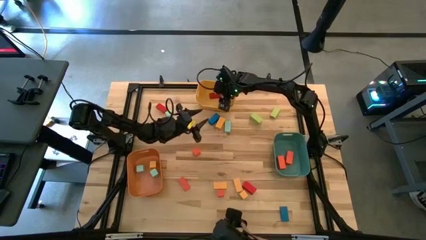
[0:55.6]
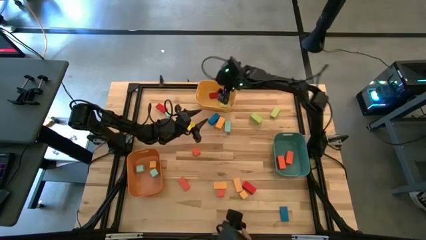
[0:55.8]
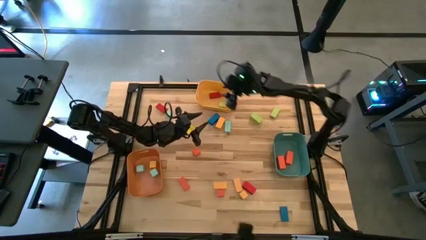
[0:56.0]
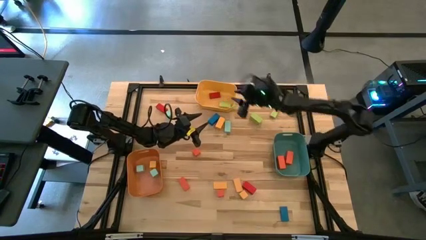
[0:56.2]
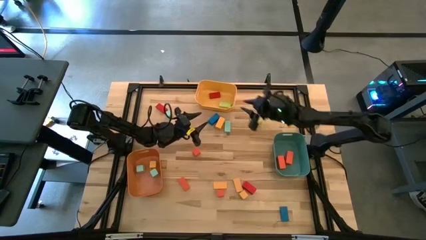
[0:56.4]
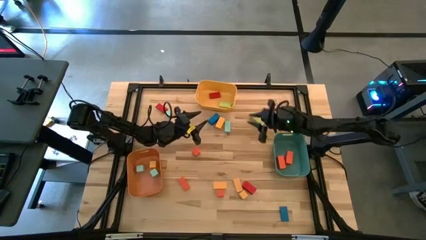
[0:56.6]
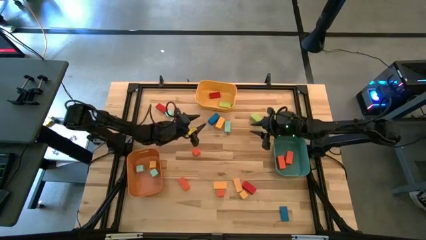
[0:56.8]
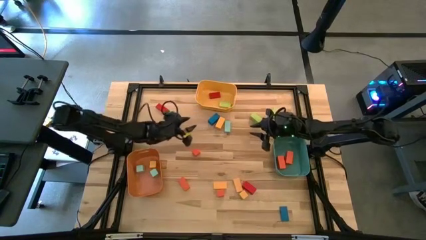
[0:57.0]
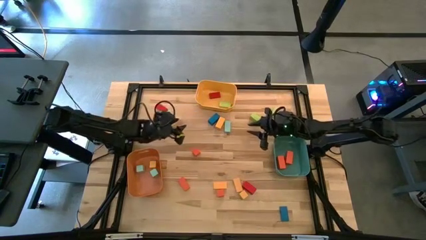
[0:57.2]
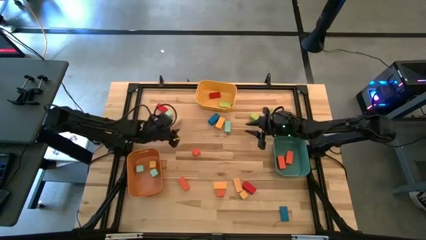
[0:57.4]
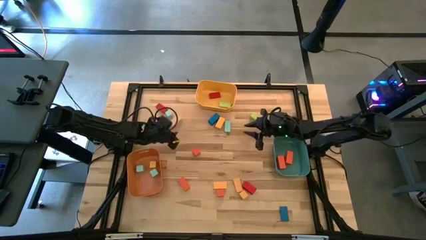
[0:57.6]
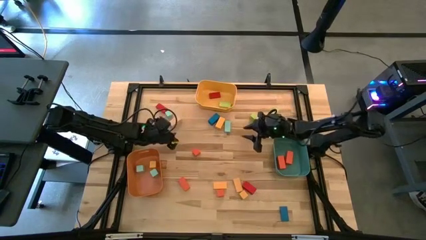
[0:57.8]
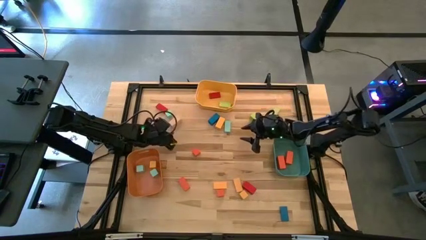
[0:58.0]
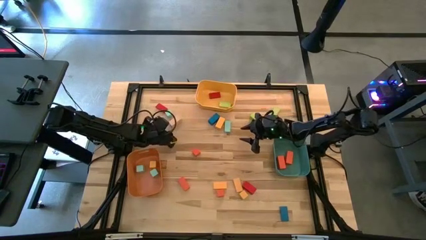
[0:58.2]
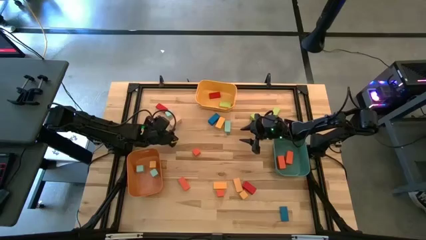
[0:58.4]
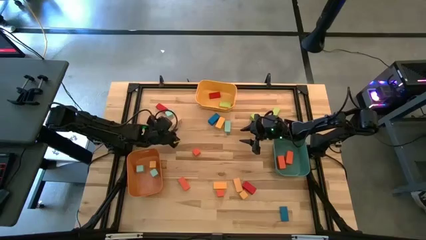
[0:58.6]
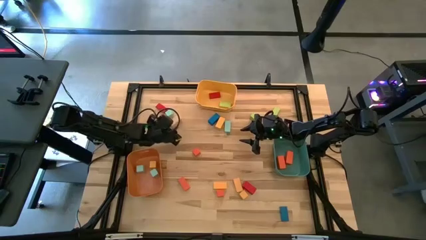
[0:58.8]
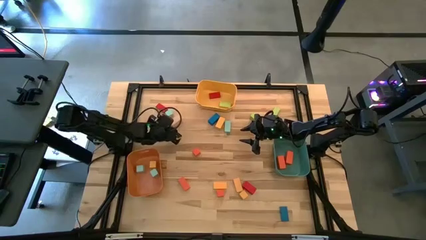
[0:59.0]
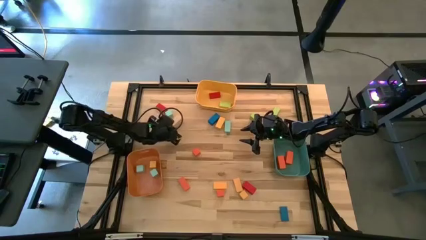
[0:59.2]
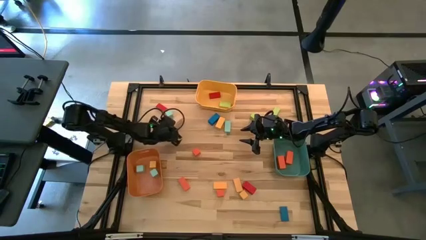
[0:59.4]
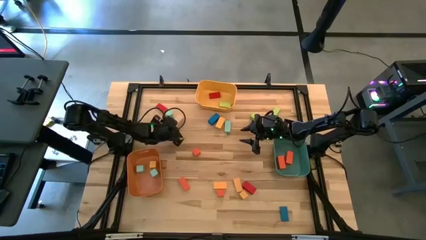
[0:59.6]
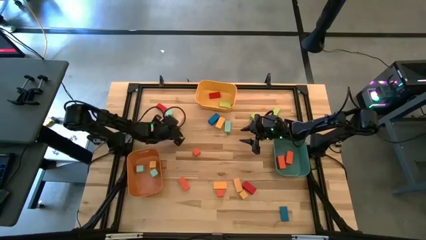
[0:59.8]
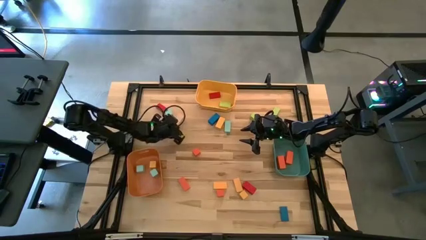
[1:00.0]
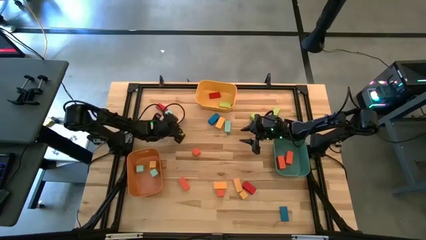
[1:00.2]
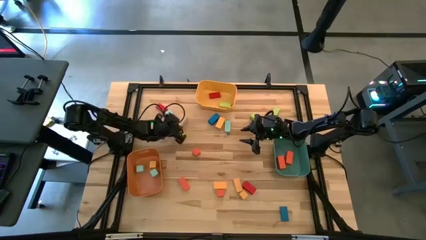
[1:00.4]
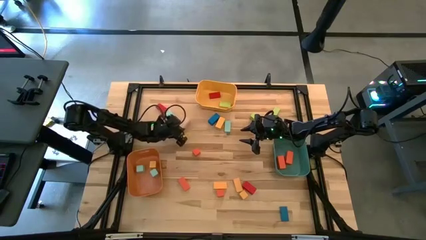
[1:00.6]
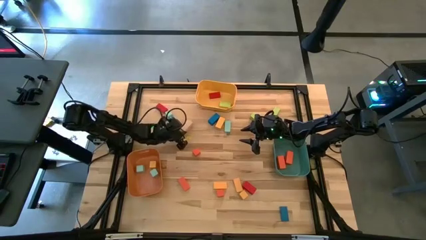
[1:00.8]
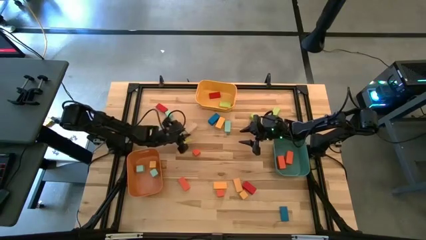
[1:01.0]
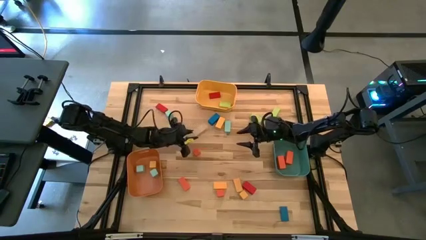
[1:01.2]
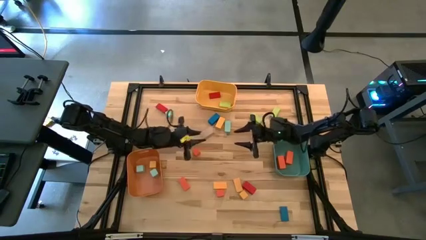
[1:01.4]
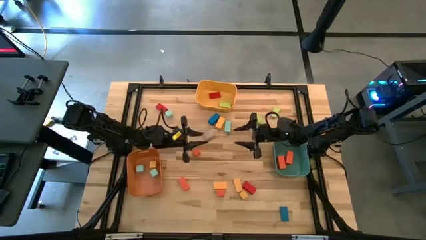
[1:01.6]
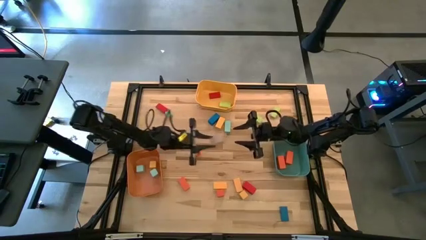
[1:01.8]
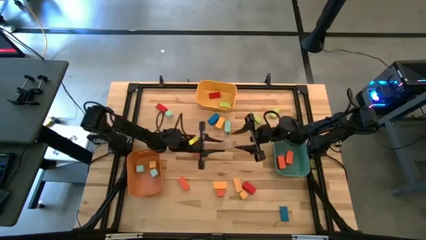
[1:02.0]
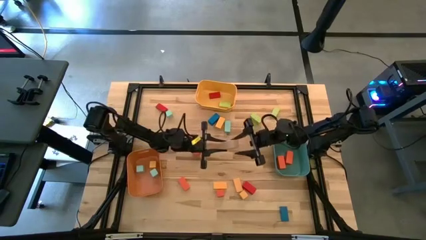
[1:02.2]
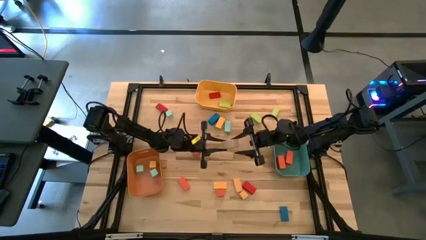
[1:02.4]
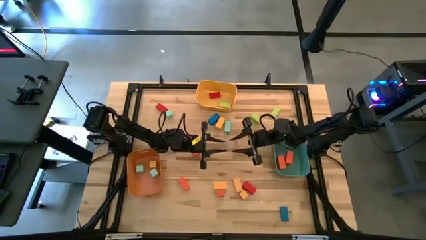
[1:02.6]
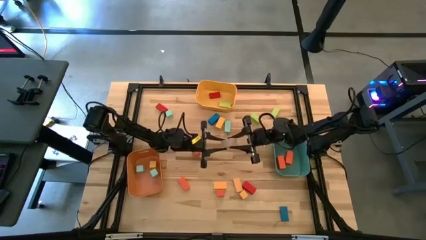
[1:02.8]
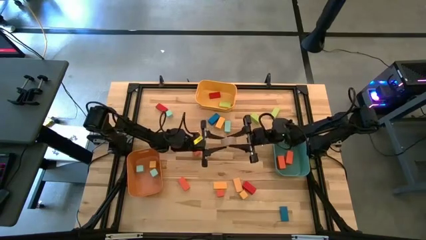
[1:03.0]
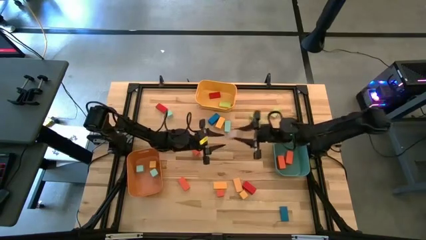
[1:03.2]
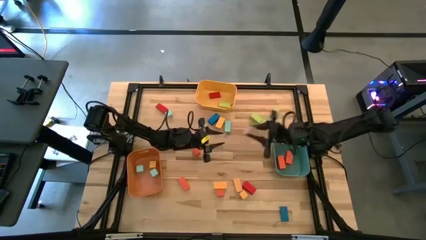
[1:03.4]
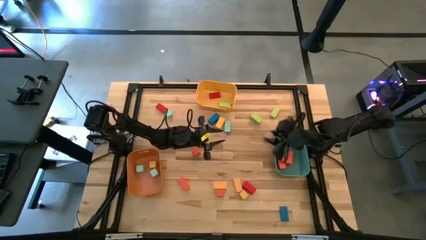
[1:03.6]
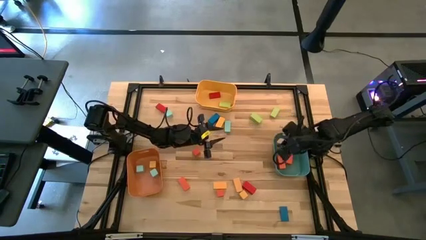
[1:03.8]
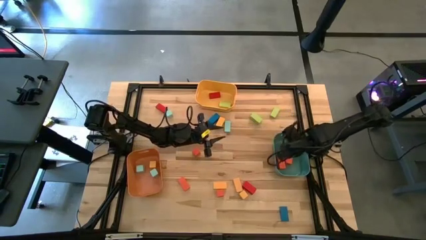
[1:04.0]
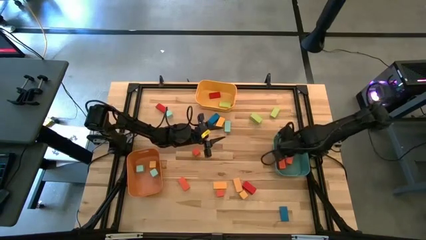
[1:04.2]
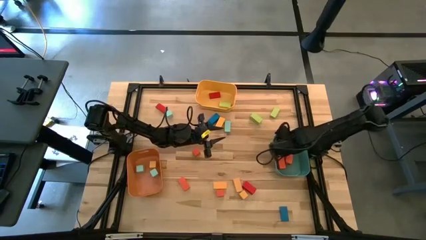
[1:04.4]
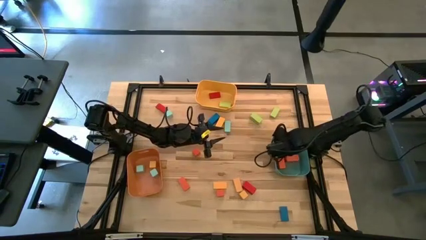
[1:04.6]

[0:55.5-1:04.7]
Task: Sort blocks by size
Put the thick brown rectangular block into the green bin

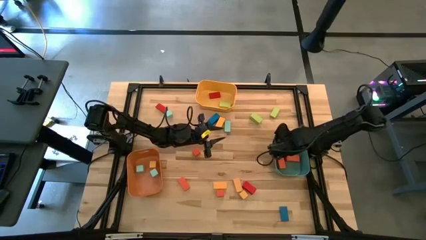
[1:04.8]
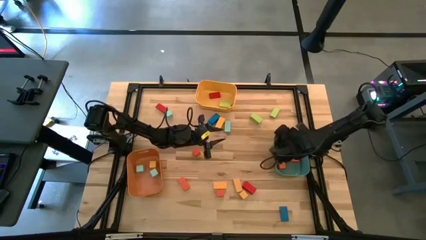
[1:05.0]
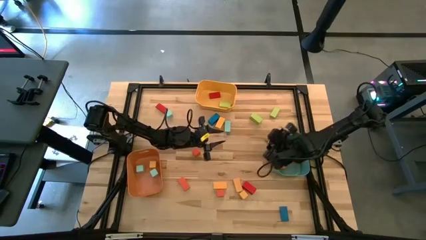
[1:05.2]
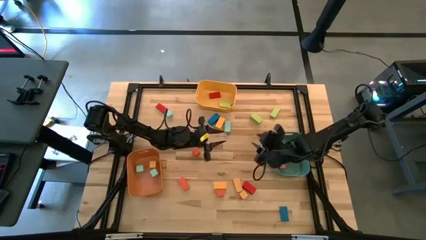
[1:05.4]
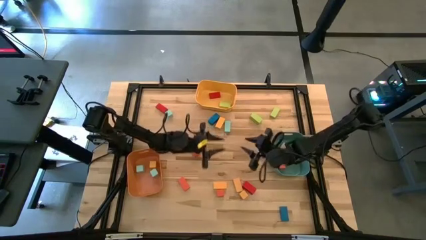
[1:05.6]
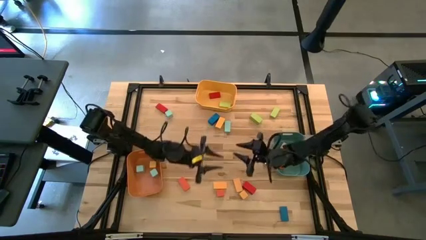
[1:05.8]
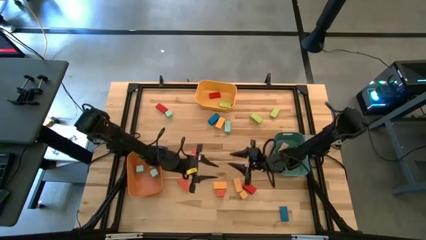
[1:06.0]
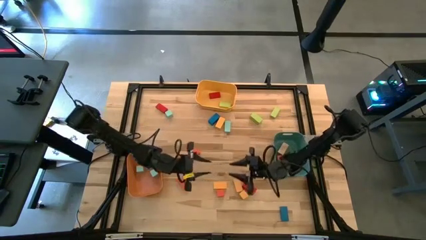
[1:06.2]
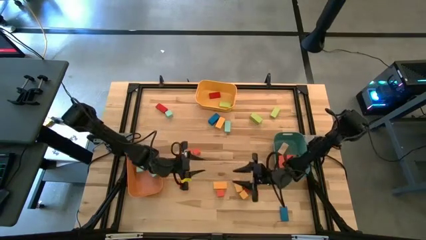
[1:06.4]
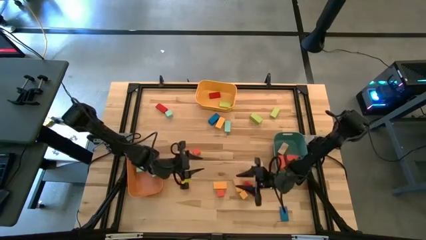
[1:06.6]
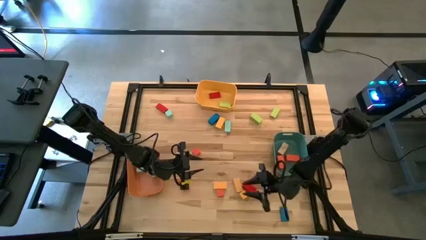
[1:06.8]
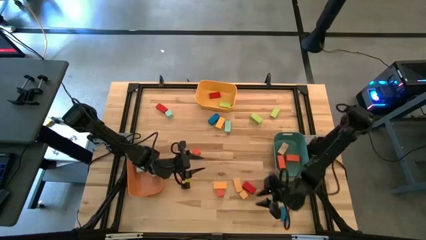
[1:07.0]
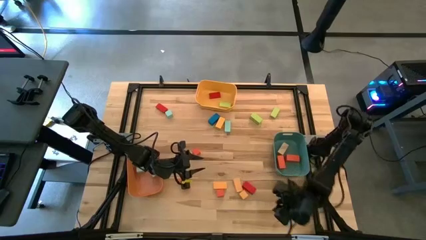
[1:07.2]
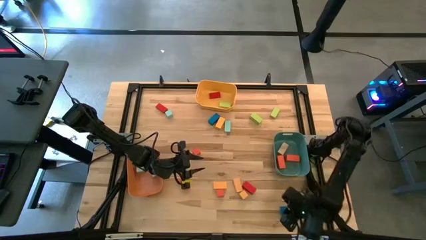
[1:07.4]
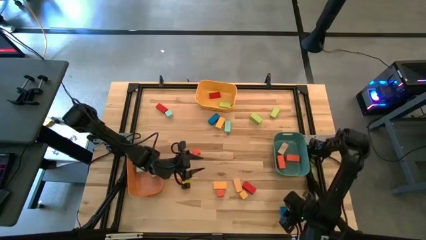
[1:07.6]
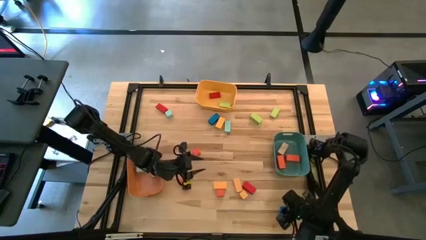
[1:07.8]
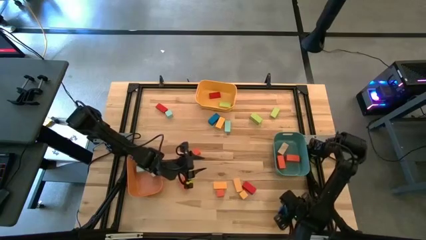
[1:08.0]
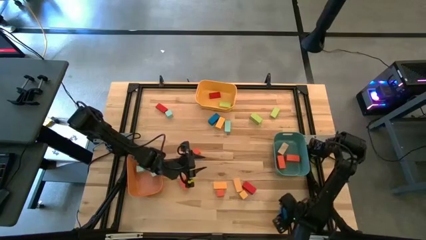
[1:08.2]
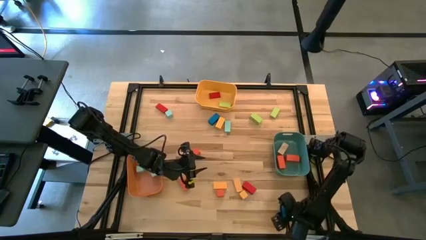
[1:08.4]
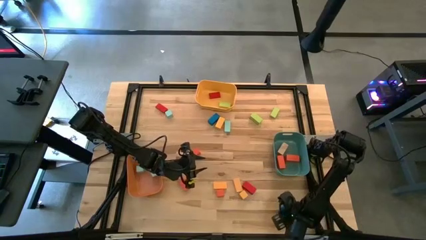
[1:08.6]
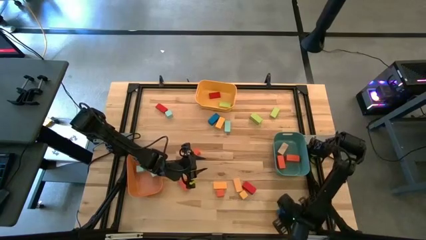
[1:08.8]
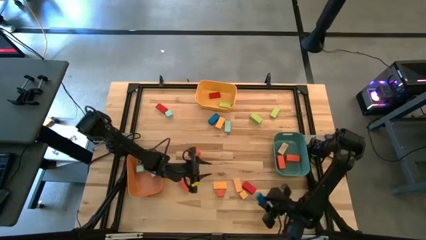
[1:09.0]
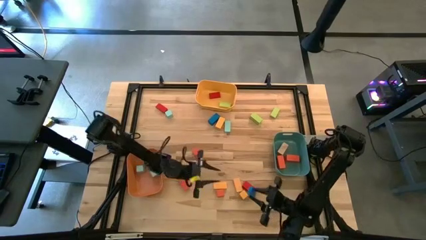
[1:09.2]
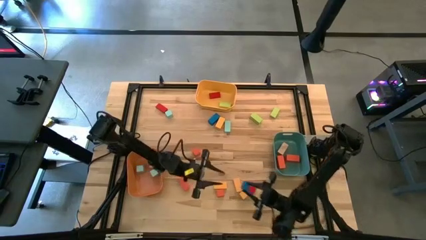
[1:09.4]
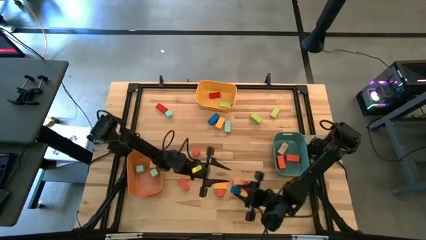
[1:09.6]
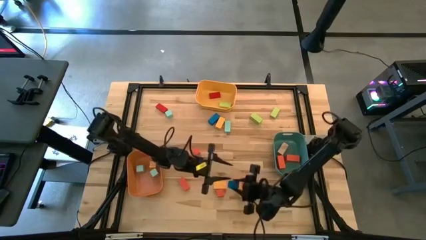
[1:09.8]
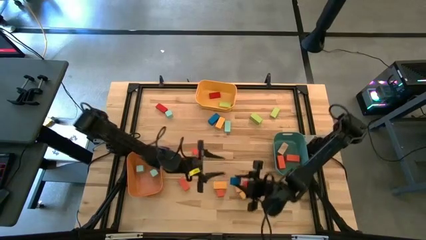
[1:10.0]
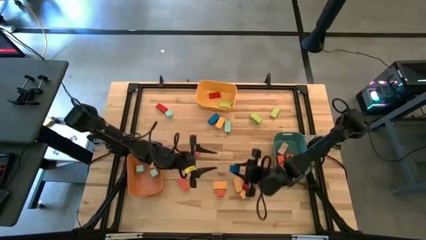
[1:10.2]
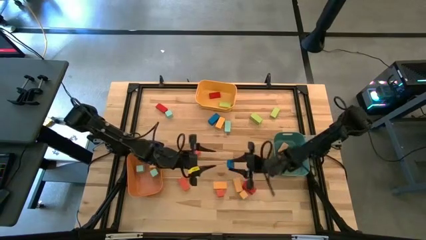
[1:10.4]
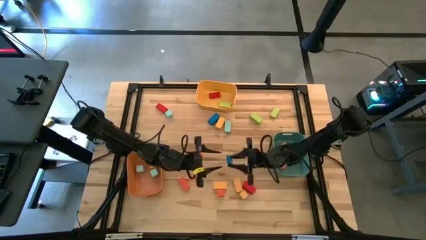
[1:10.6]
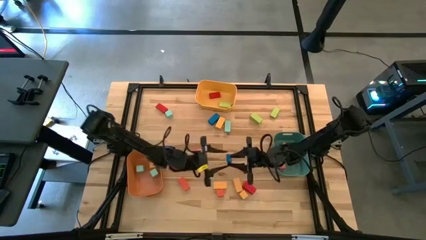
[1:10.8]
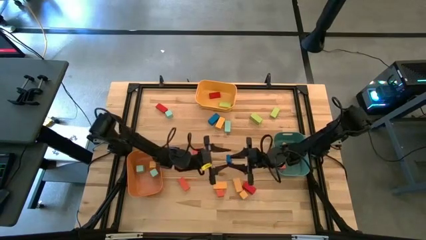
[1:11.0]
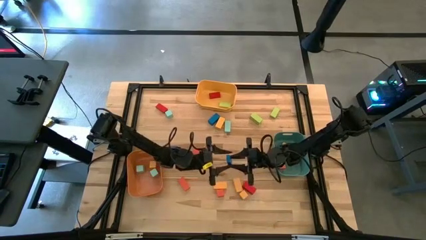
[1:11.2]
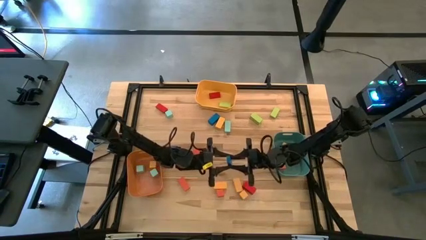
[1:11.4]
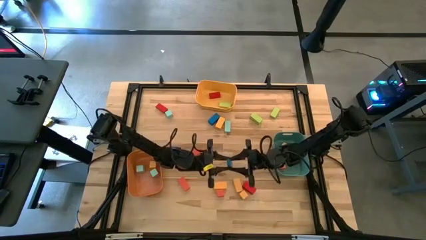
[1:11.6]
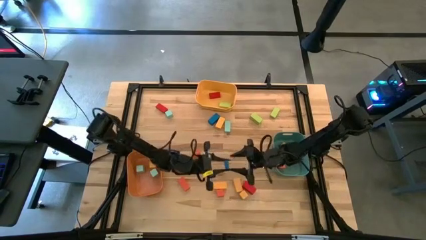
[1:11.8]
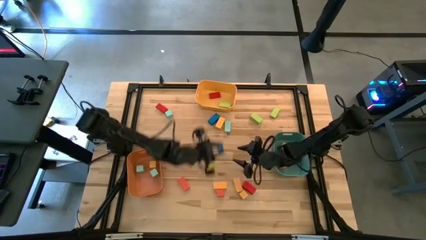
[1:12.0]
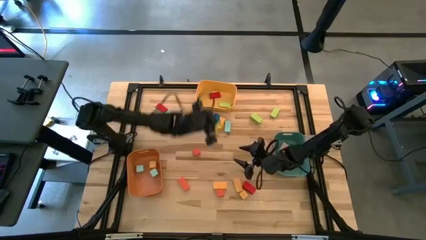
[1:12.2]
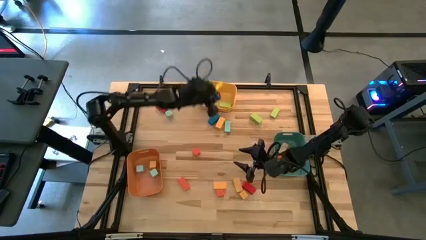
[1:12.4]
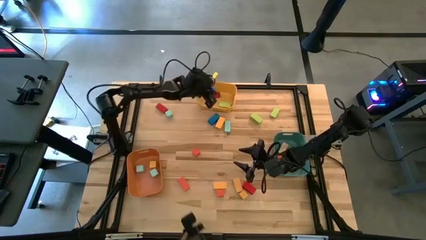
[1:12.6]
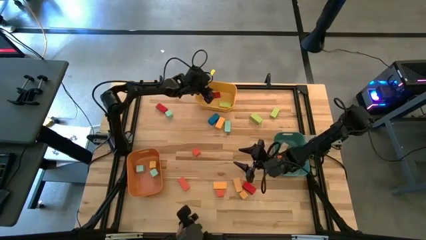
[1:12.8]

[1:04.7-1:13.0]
Put the thin blue rectangular block into the yellow bin
